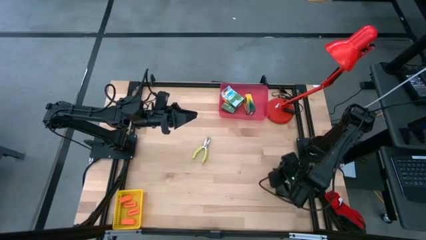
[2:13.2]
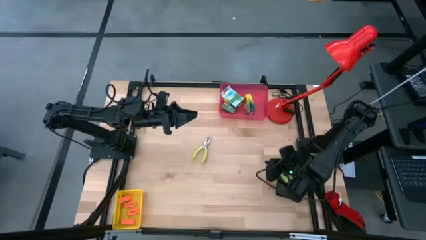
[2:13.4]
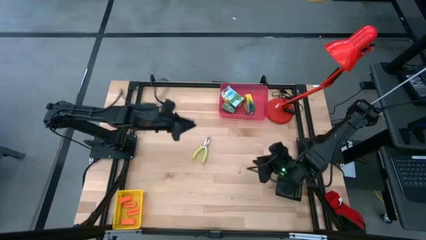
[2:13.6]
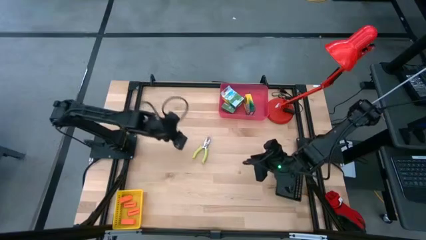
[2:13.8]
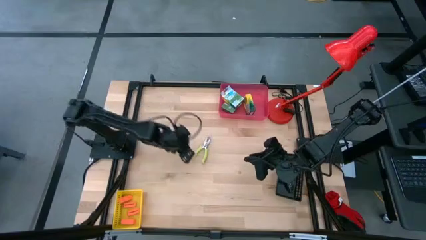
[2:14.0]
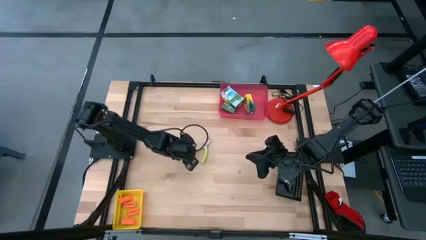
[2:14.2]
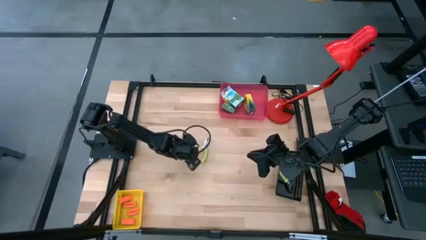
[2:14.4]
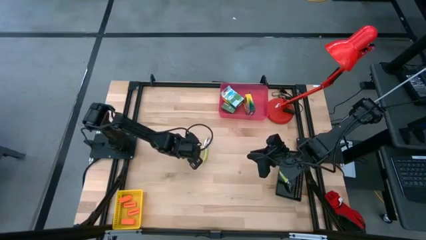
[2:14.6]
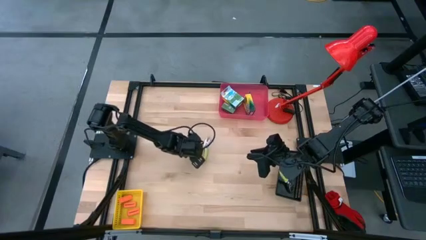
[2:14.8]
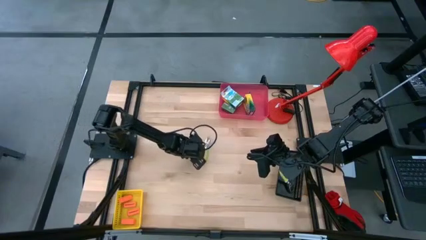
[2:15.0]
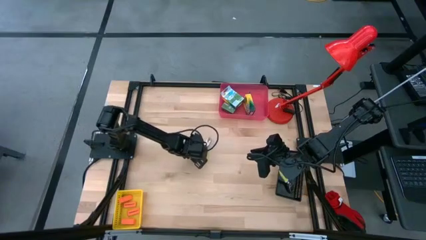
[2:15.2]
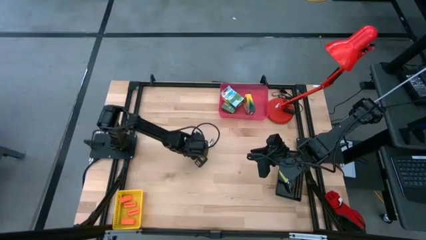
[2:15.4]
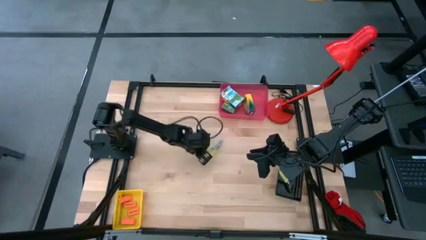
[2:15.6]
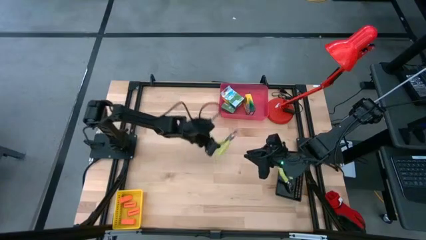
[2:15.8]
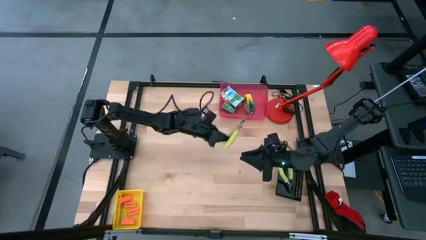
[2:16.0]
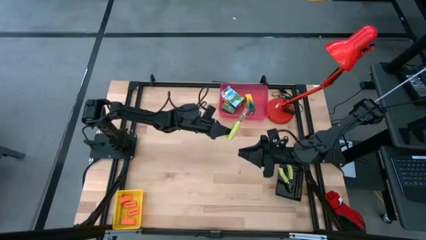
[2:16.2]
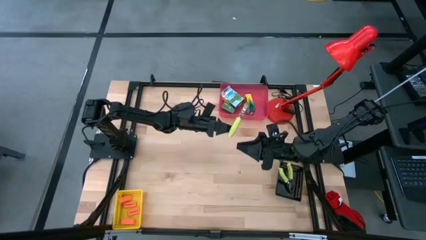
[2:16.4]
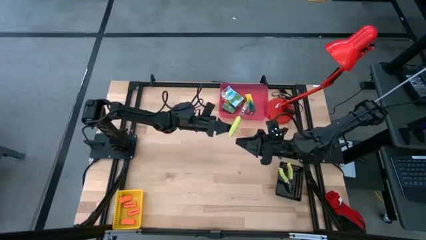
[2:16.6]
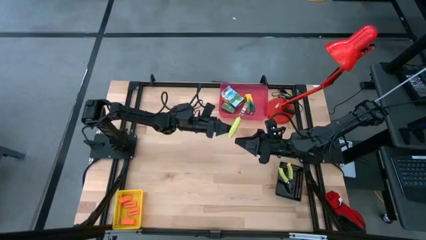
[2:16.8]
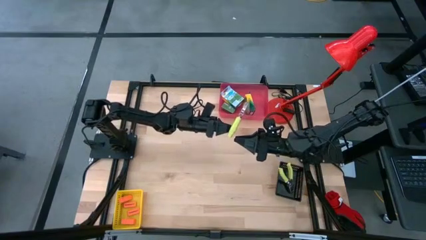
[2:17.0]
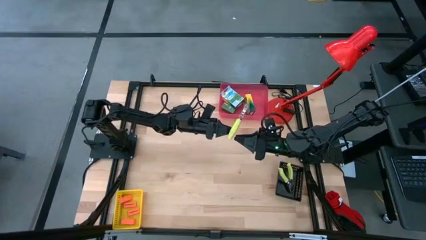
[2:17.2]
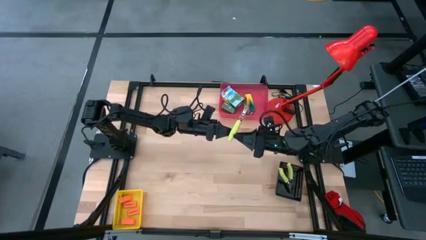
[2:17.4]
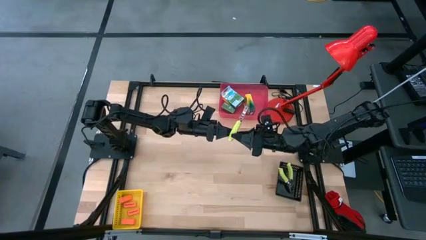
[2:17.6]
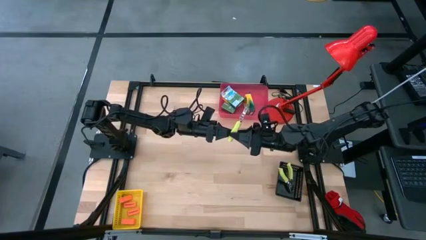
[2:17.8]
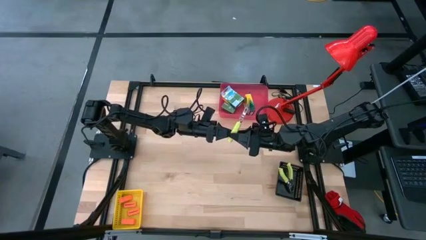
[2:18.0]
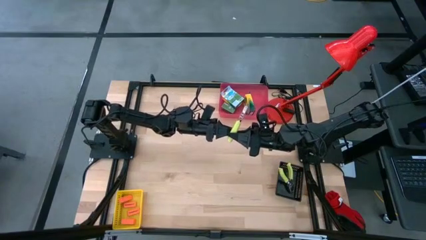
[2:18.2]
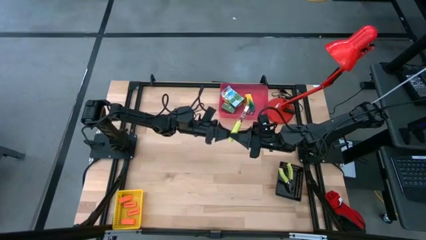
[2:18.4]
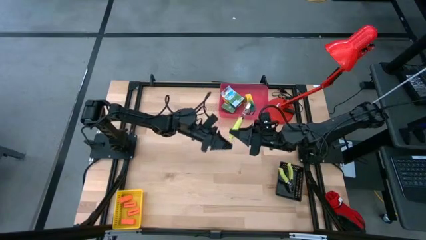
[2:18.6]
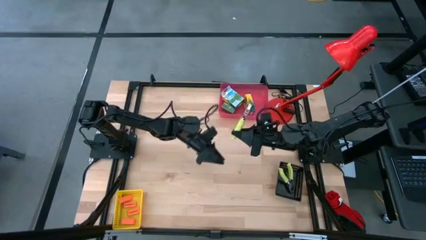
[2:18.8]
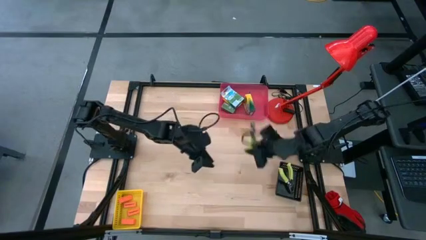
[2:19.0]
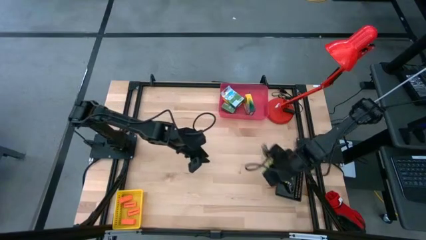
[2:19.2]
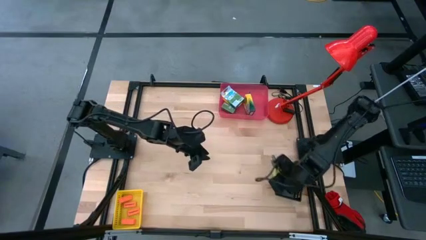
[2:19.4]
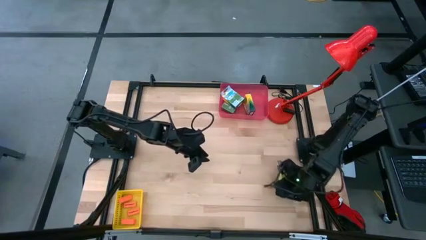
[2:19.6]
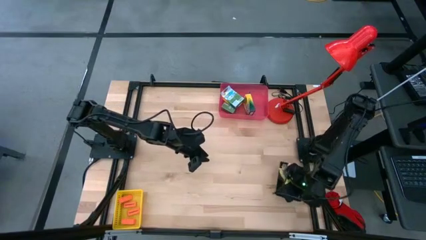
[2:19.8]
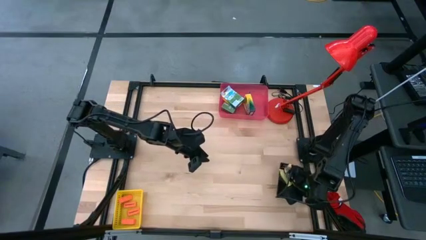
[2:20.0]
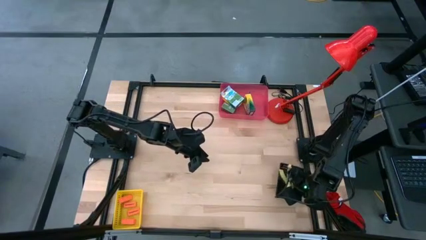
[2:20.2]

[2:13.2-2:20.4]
Task: Pick & Place School Supplies
Put the light green hole puncher into the black bin

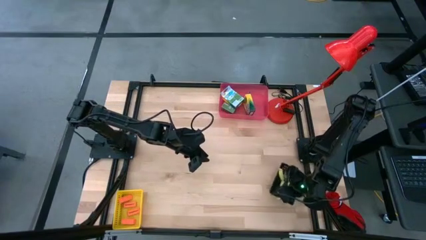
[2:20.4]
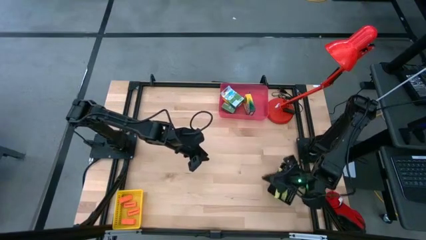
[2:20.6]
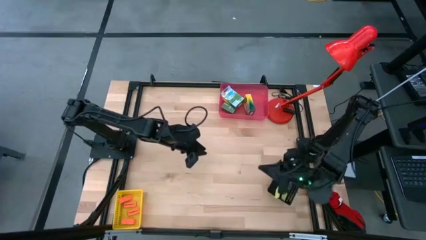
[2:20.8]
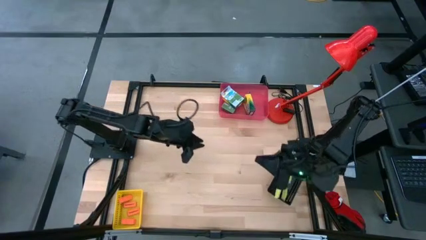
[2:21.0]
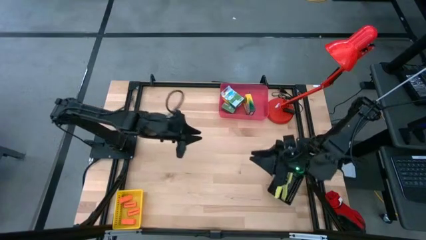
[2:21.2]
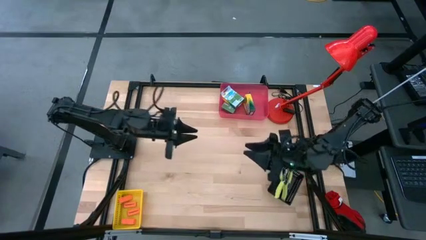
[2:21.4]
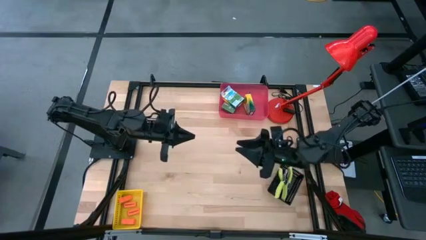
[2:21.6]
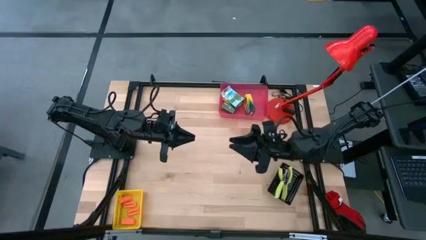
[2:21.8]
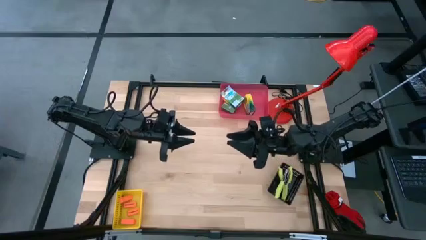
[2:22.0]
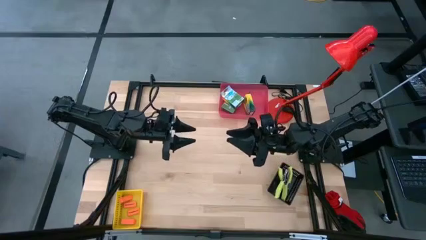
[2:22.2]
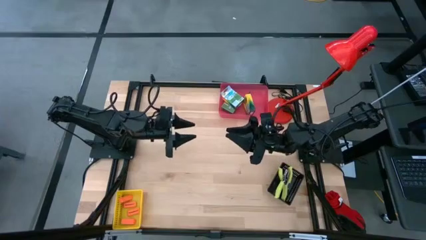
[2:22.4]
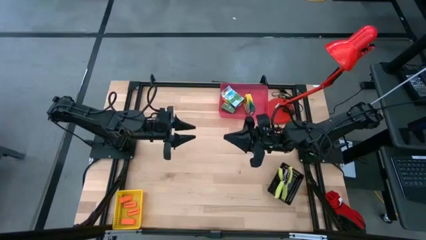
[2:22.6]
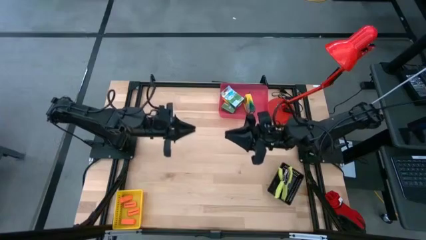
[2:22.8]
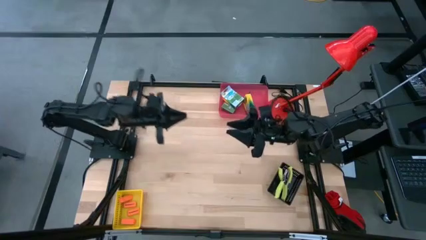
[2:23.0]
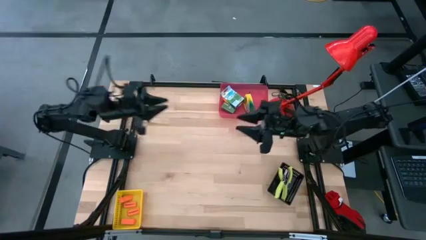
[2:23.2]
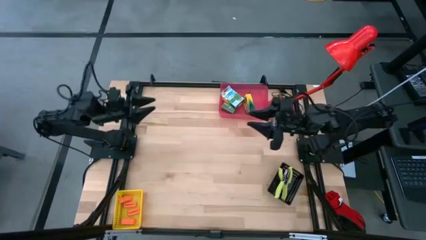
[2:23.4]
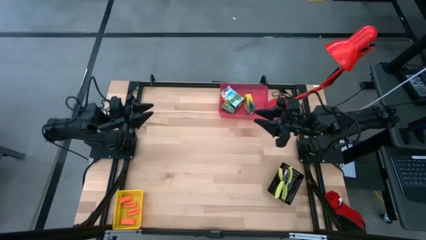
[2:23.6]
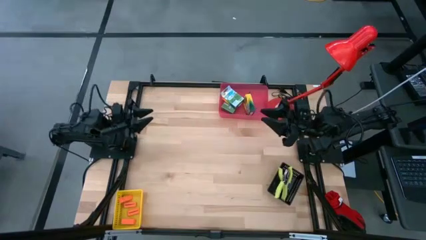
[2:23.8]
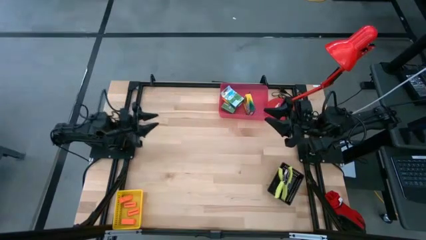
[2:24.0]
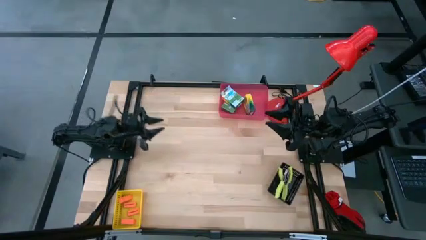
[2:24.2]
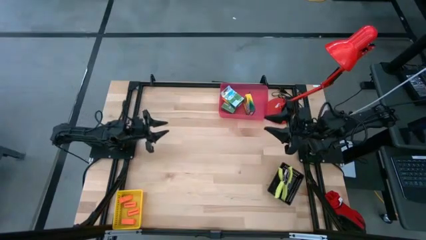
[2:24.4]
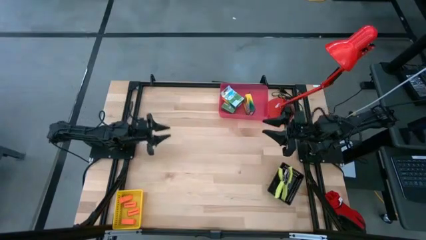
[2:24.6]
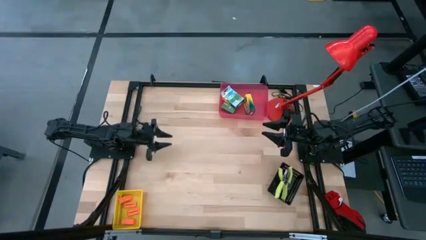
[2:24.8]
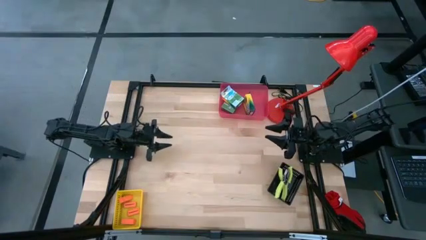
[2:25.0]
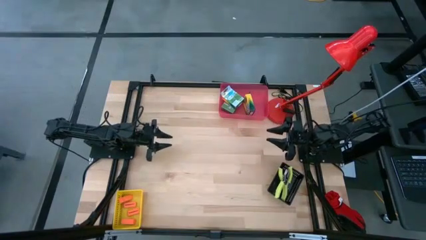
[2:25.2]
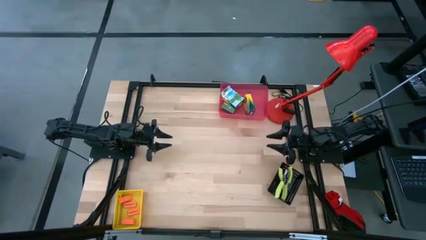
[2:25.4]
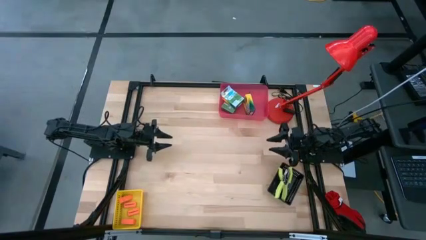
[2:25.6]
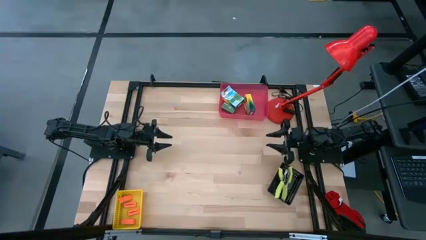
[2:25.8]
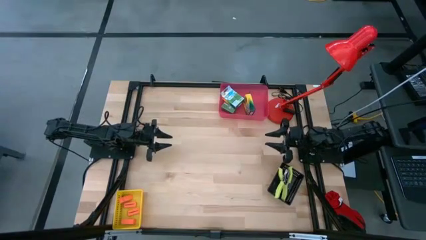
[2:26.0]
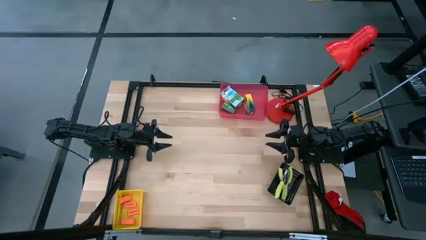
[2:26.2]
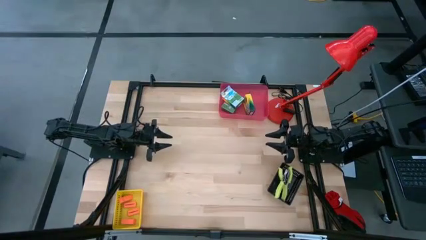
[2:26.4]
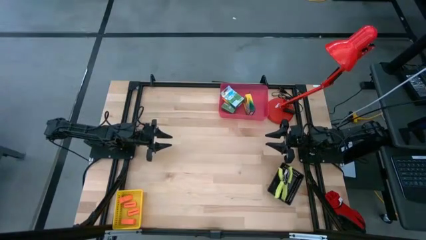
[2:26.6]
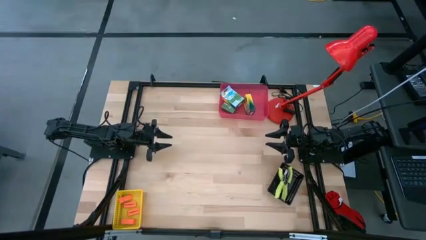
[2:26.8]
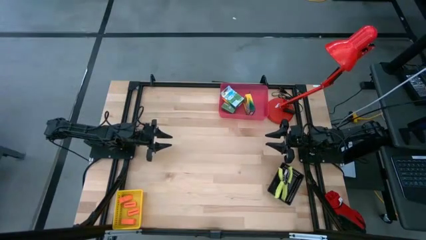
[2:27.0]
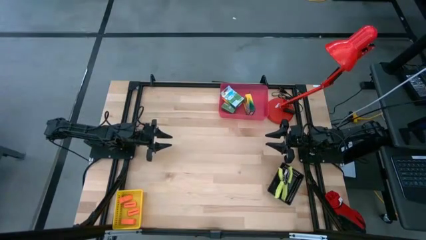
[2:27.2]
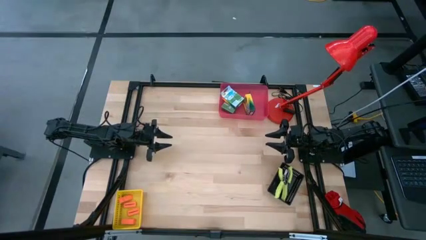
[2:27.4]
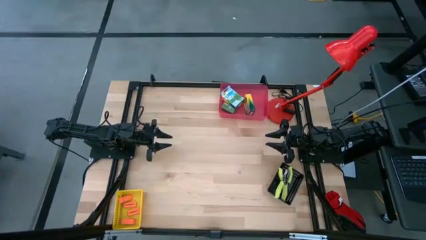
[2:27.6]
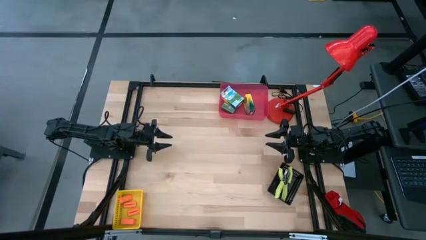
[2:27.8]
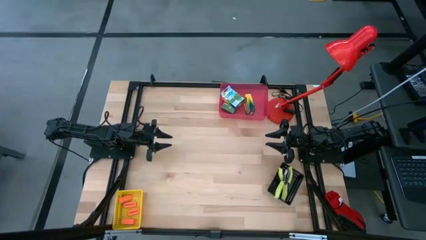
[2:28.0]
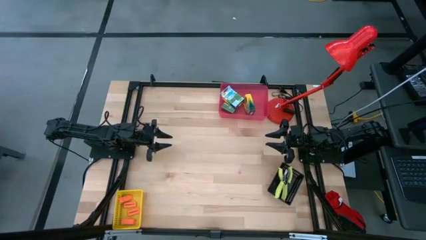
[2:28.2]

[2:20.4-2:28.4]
Return to Home Position
